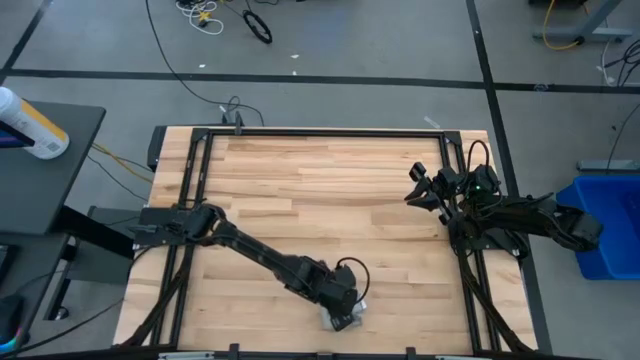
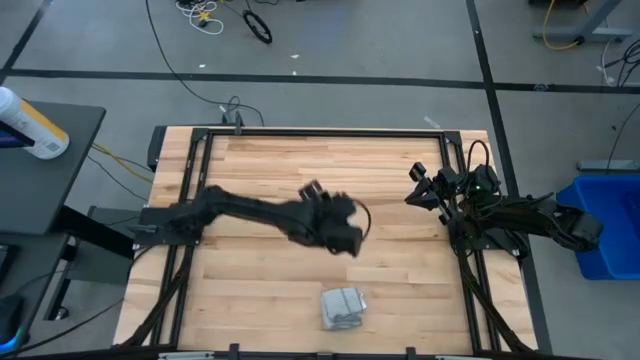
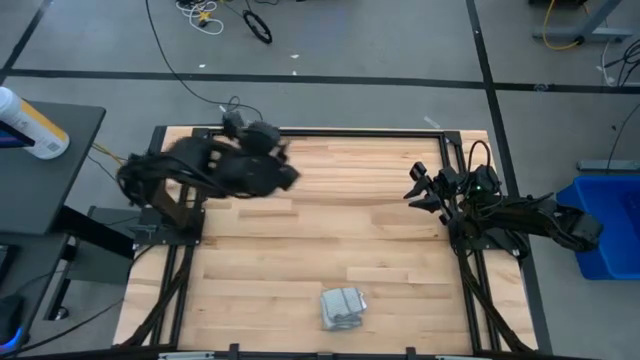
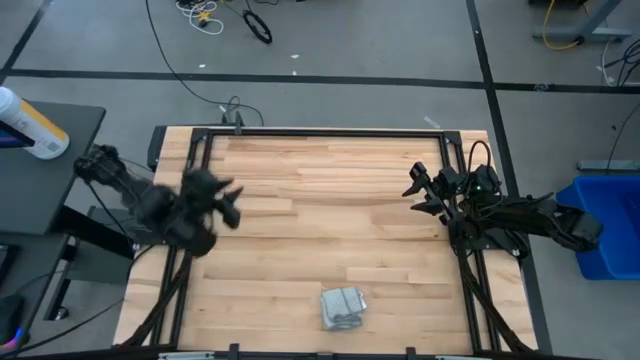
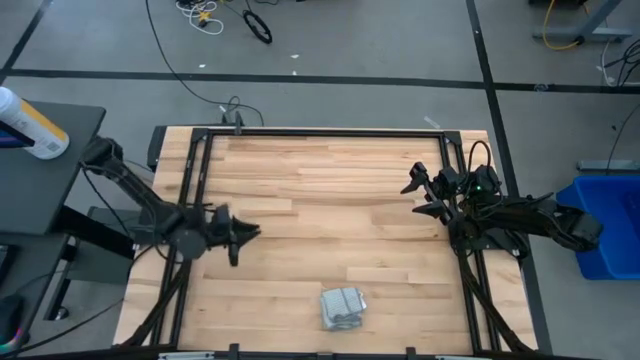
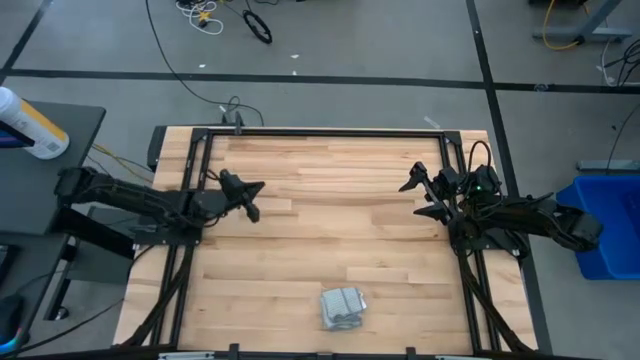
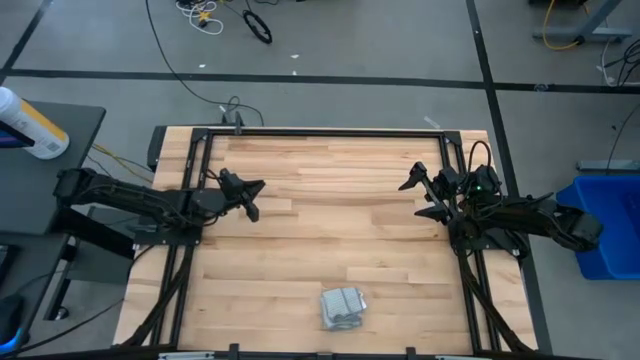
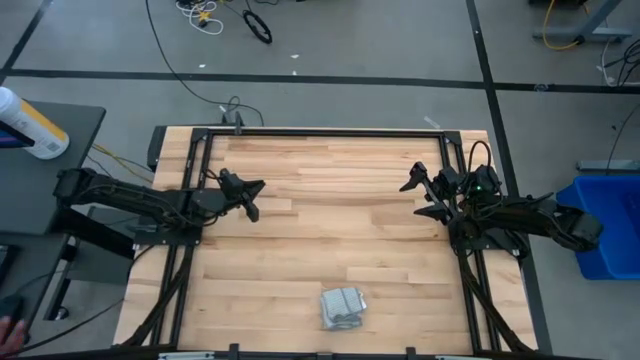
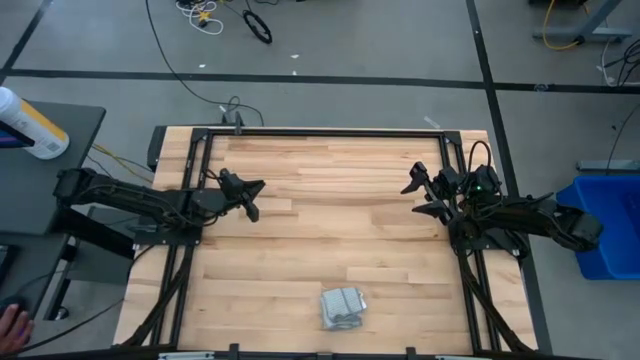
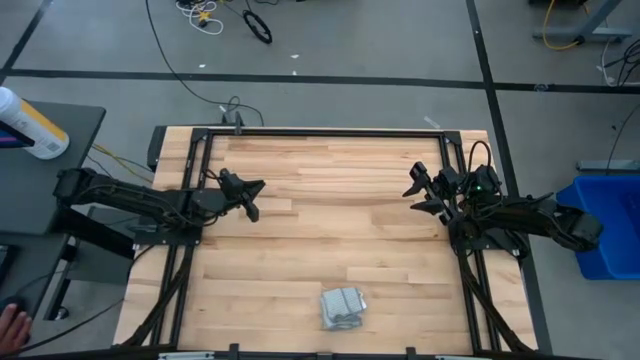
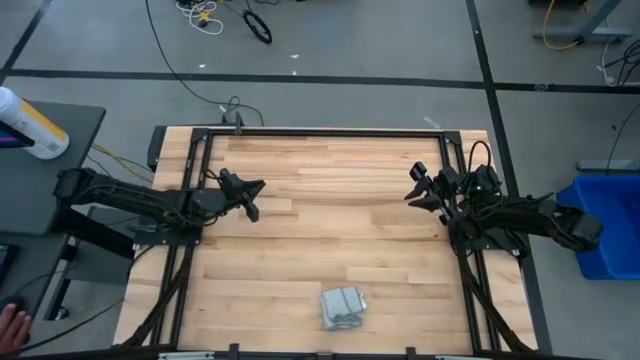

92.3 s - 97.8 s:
Task: Fold microfiber towels
Return to Home Position

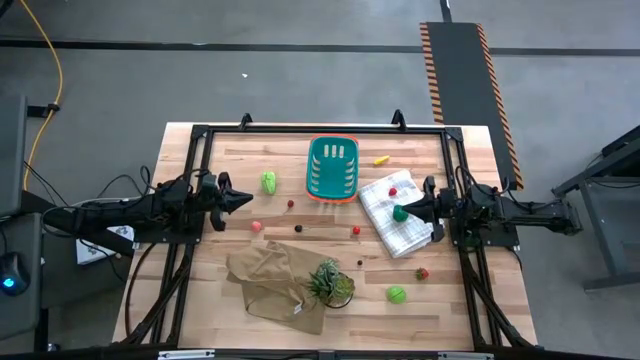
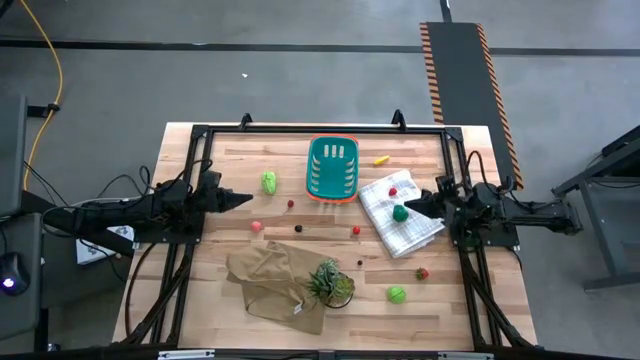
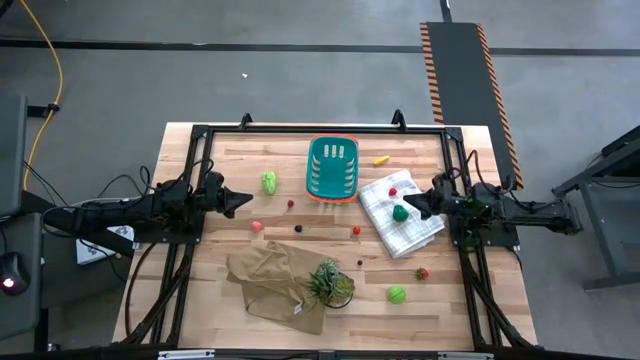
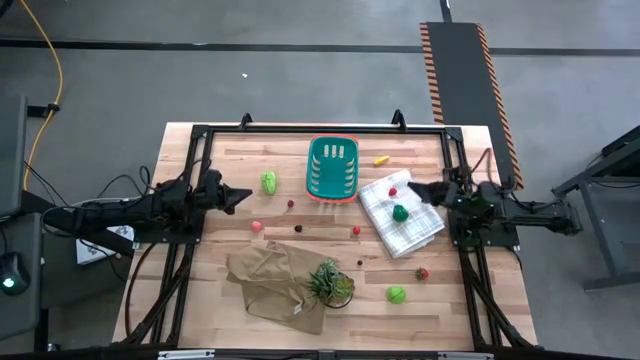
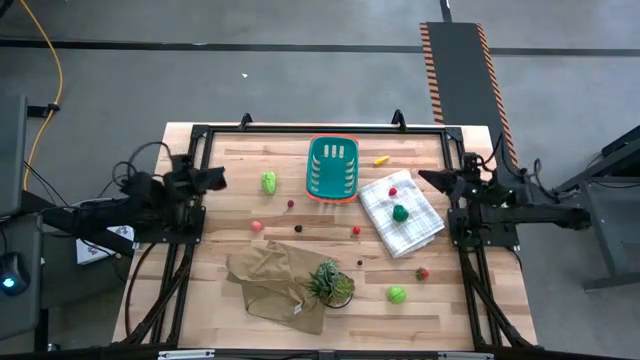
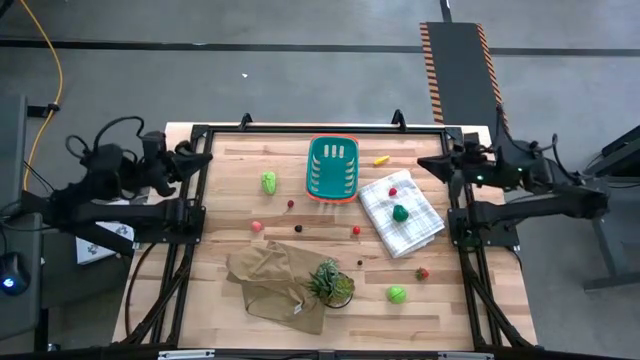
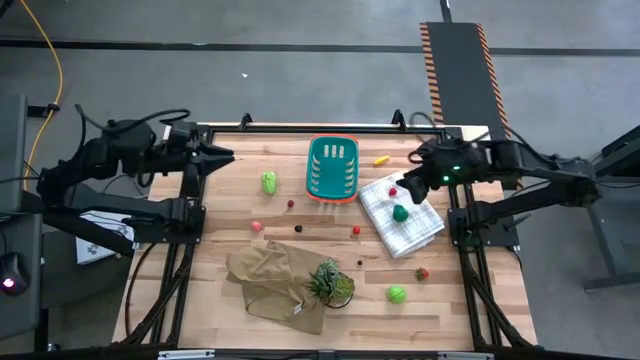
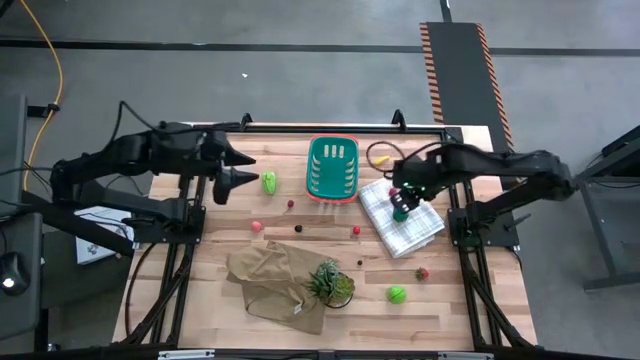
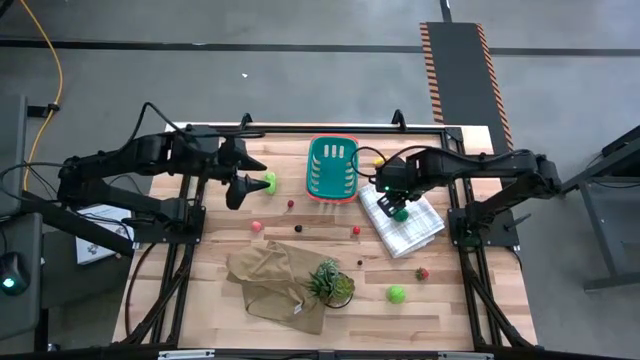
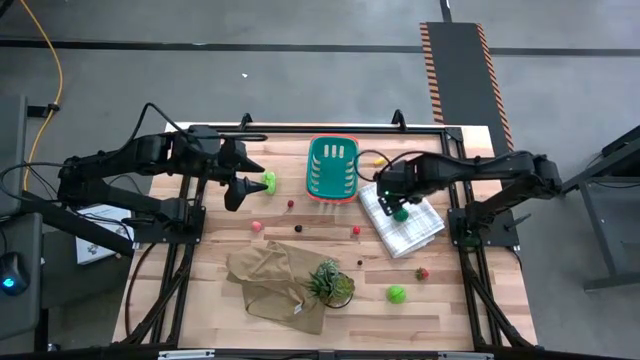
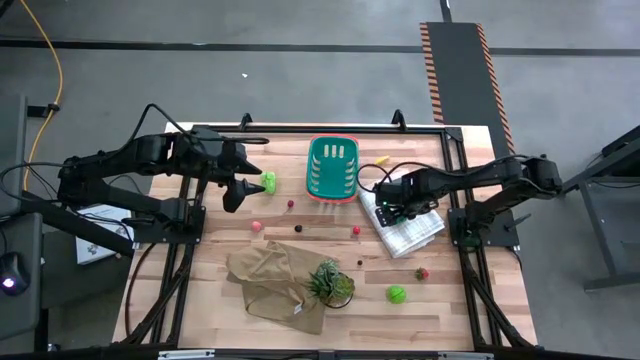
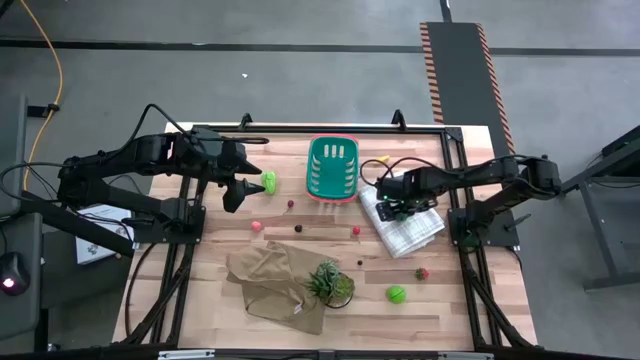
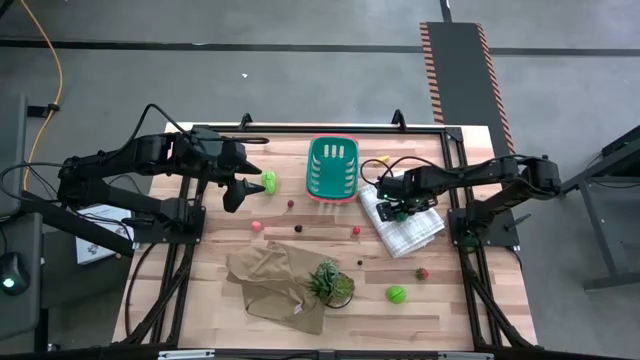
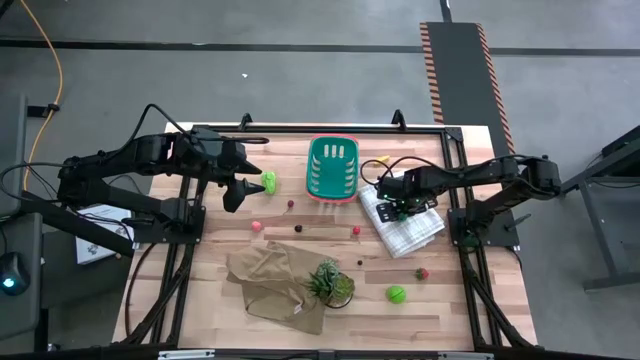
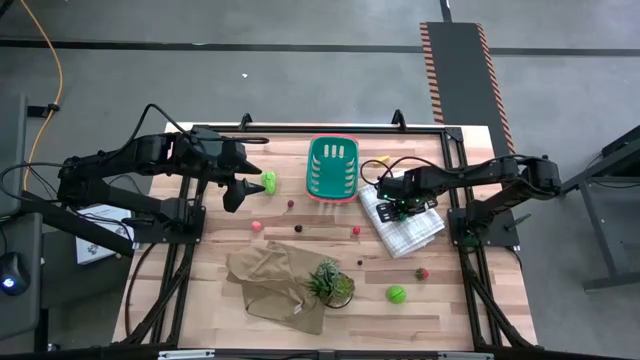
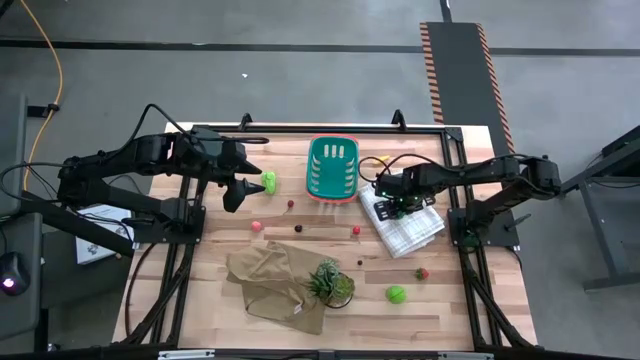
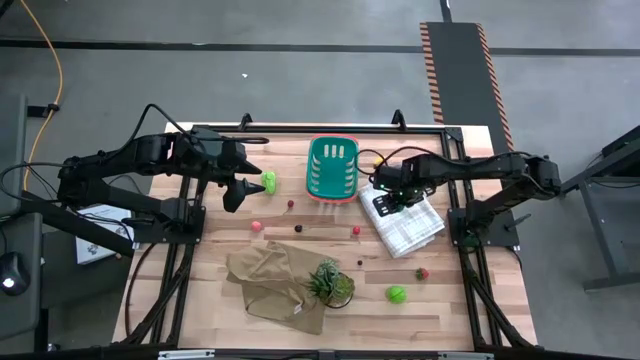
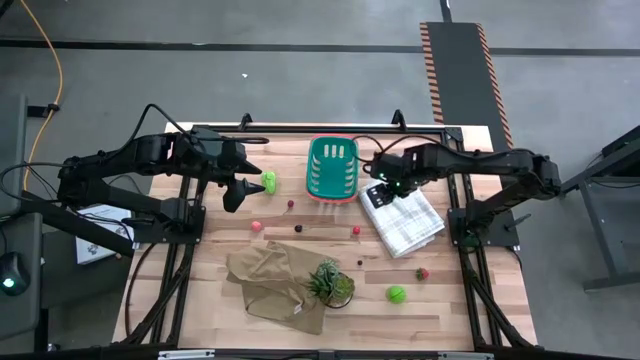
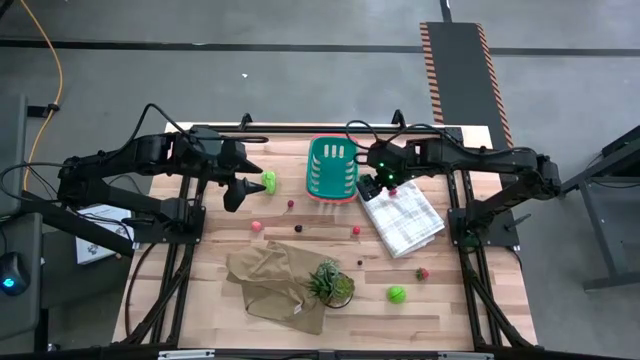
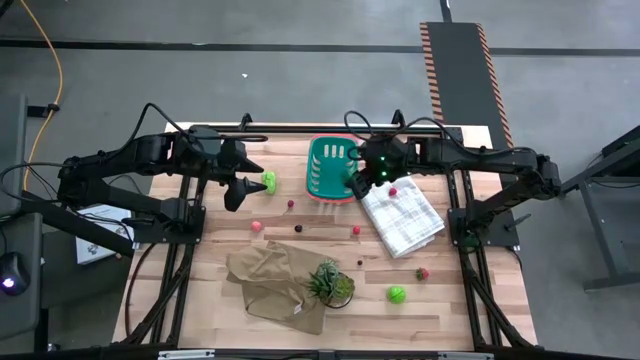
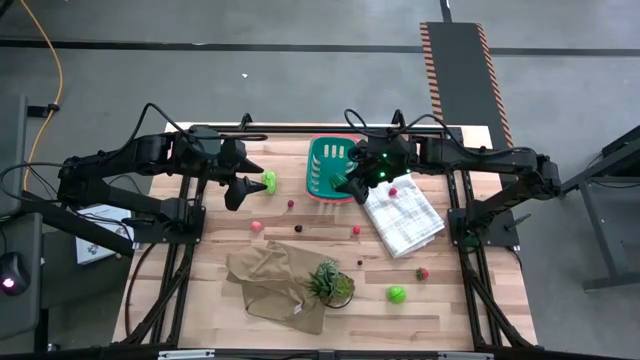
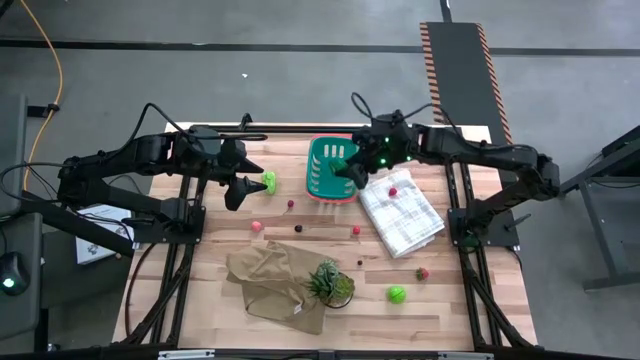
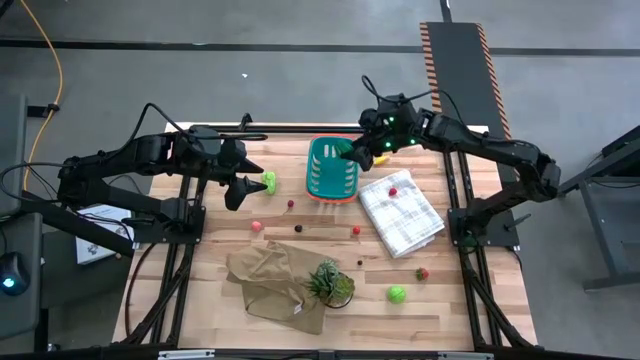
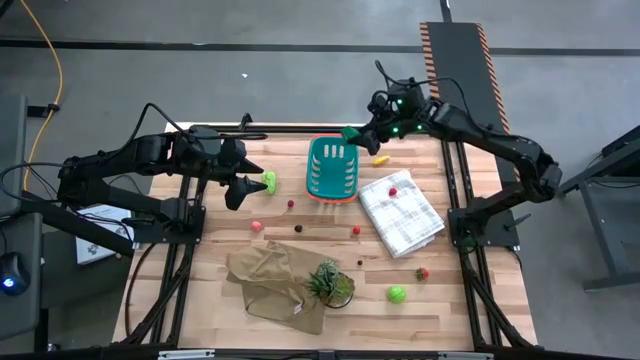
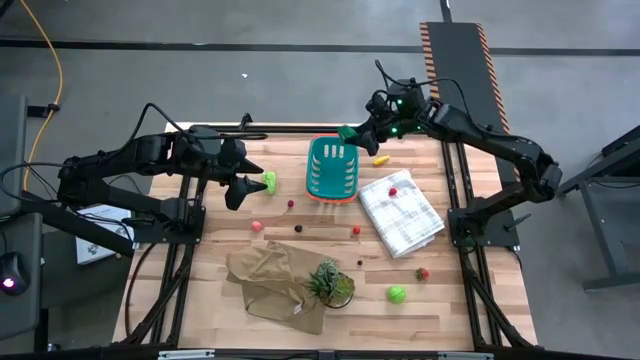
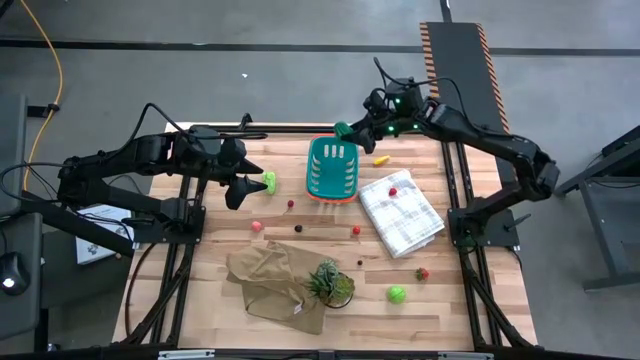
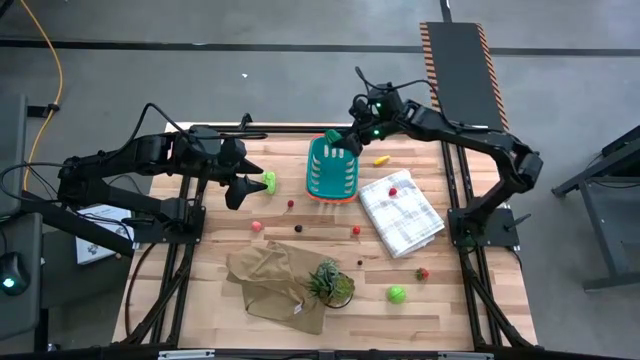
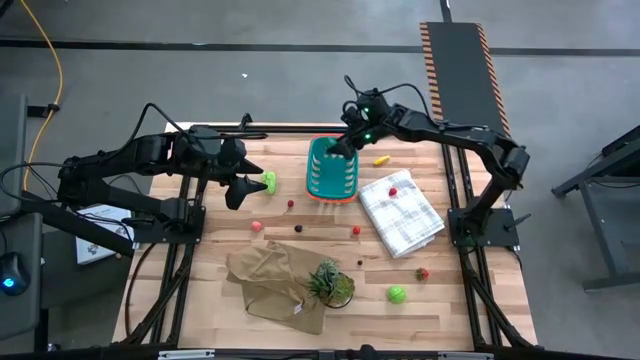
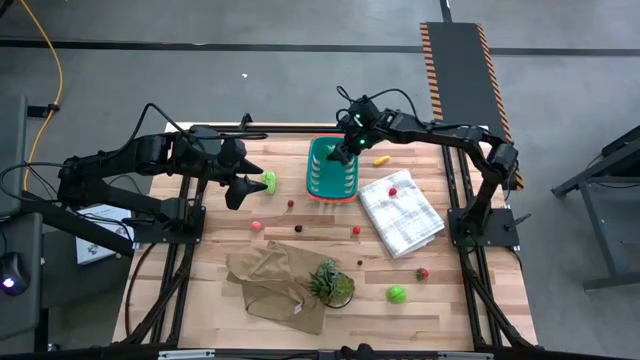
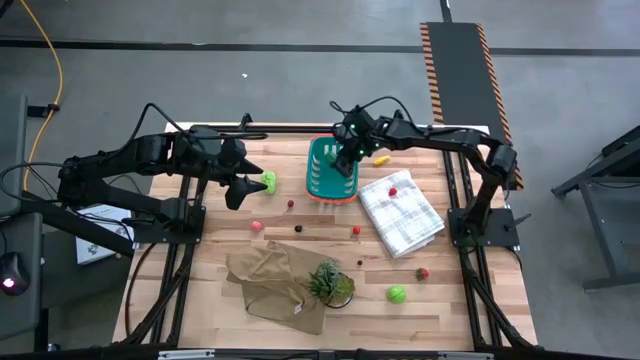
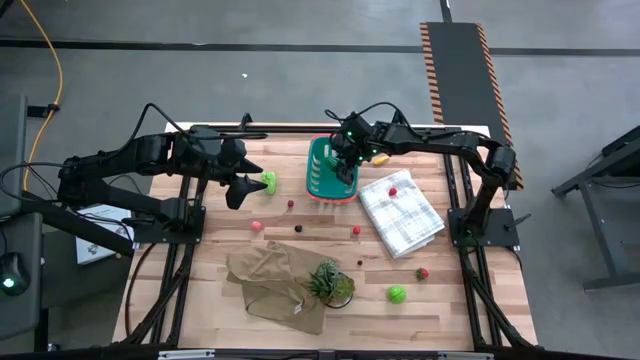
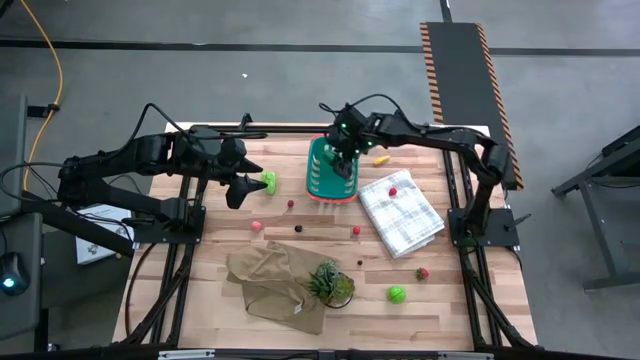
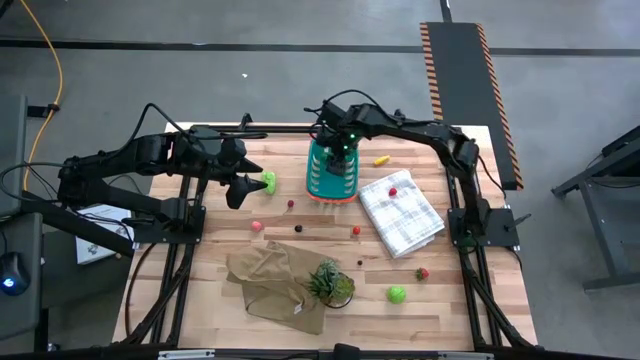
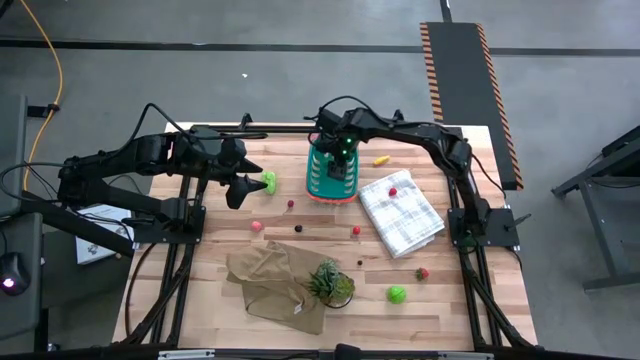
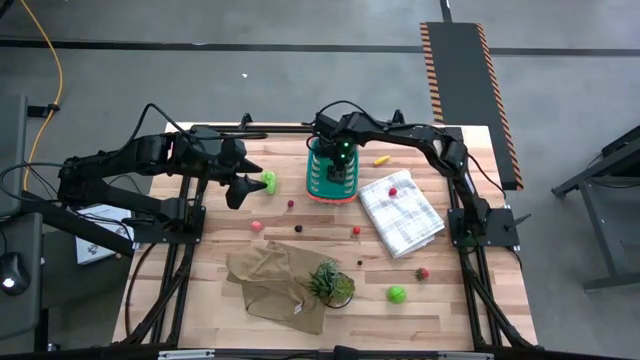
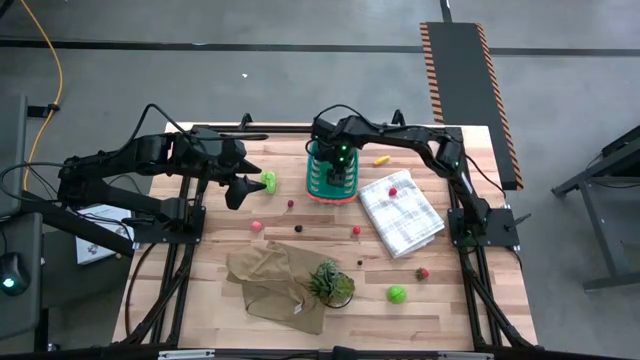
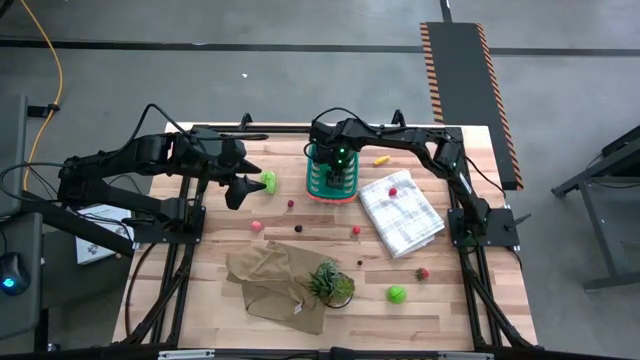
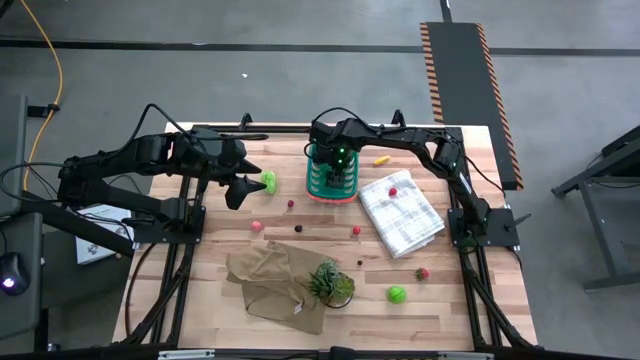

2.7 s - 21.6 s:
Task: Pick and placing Produce into tupperware
Put the green bell pepper into the green basket
